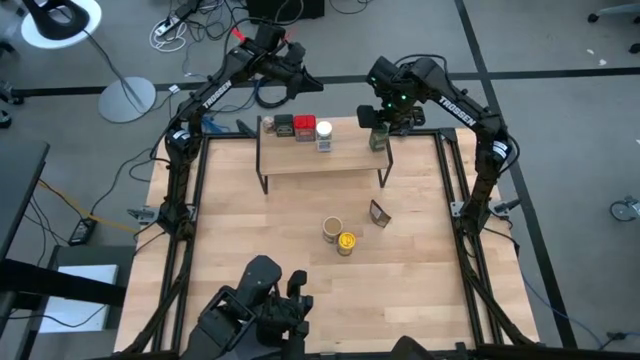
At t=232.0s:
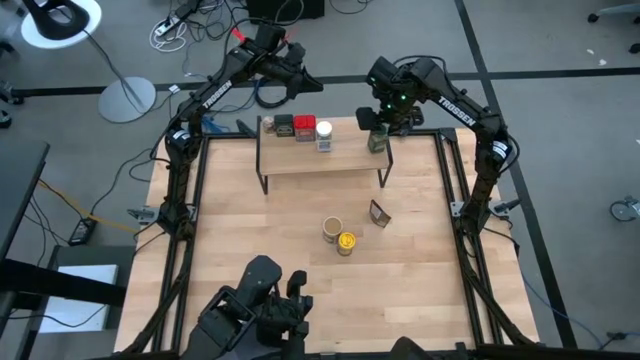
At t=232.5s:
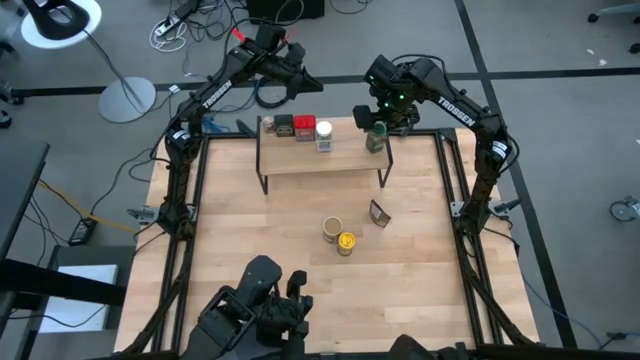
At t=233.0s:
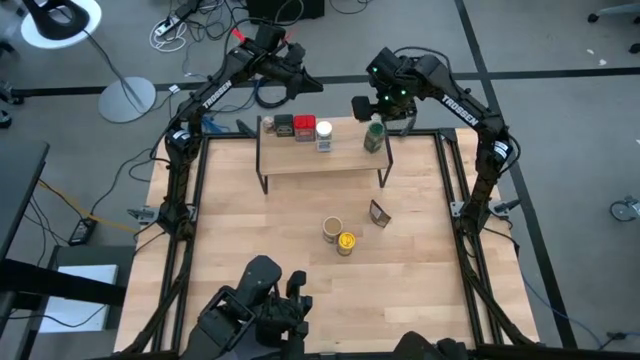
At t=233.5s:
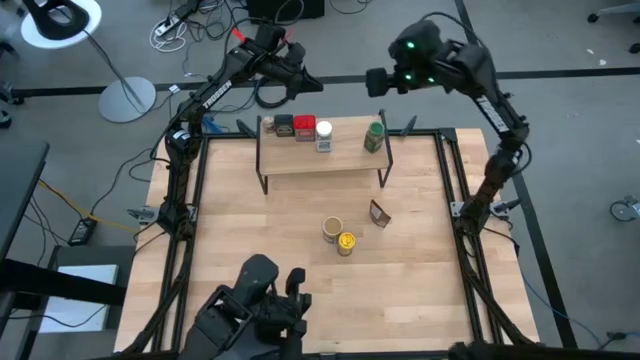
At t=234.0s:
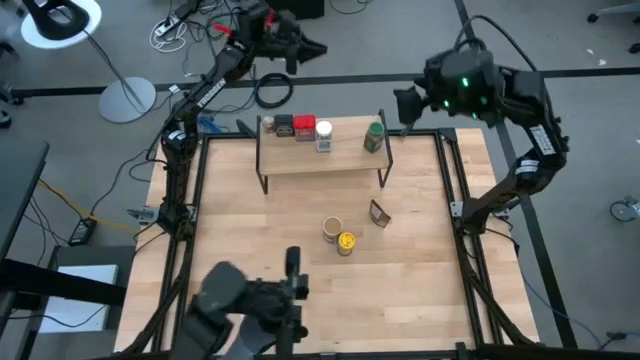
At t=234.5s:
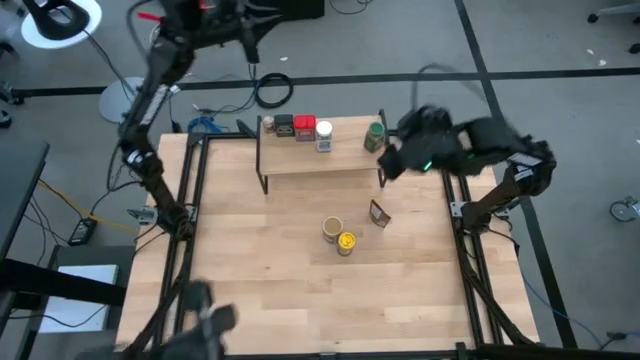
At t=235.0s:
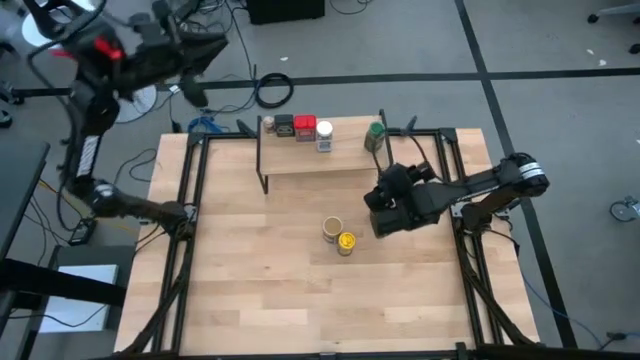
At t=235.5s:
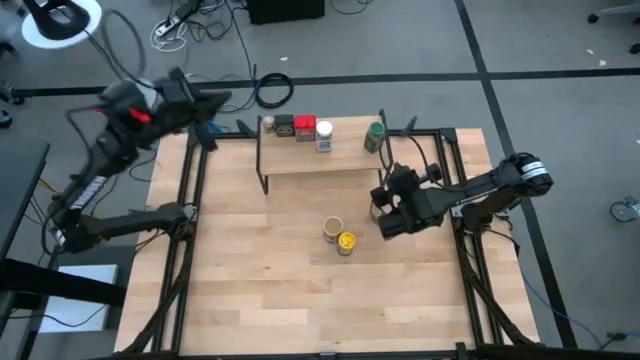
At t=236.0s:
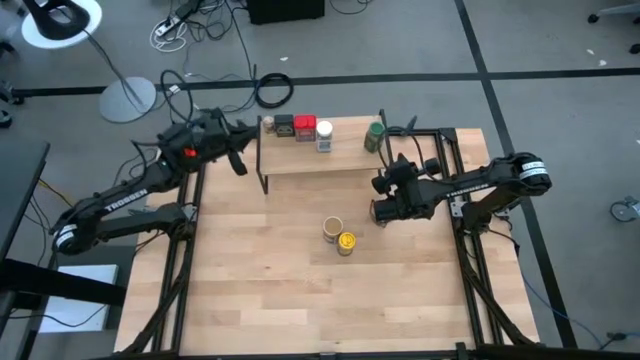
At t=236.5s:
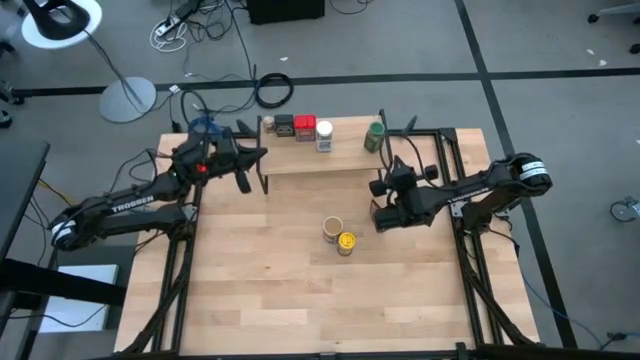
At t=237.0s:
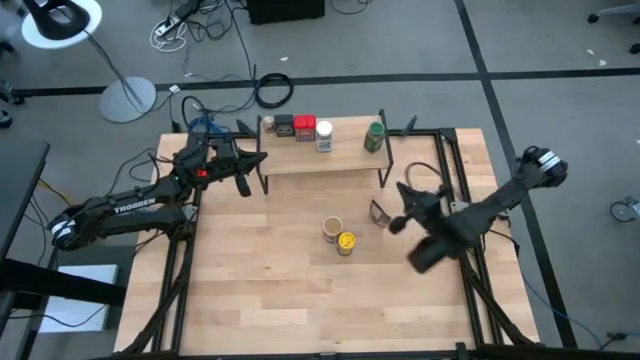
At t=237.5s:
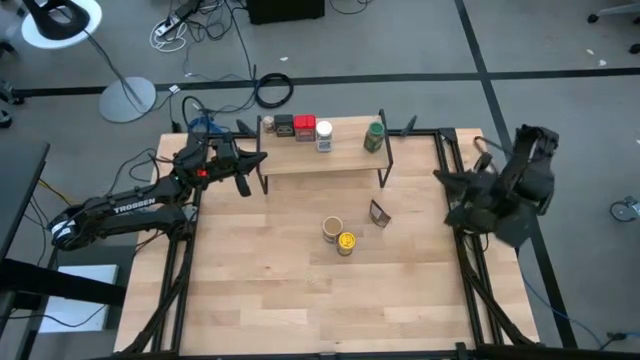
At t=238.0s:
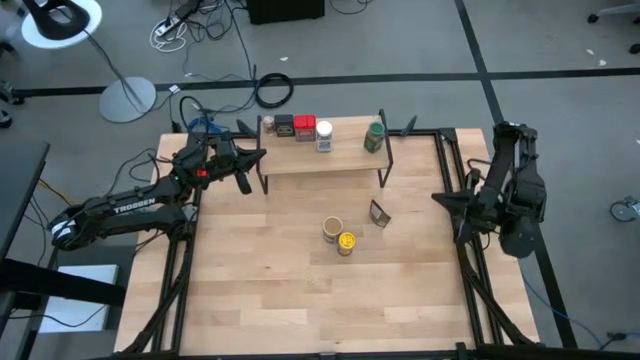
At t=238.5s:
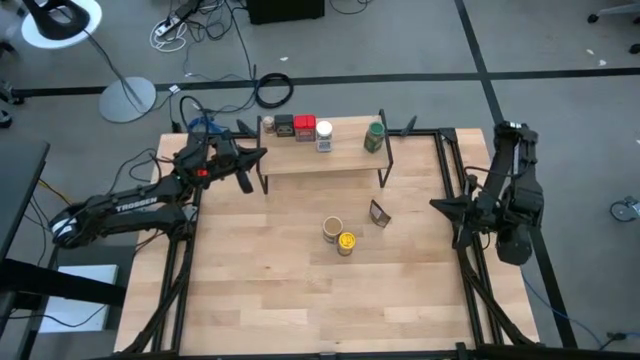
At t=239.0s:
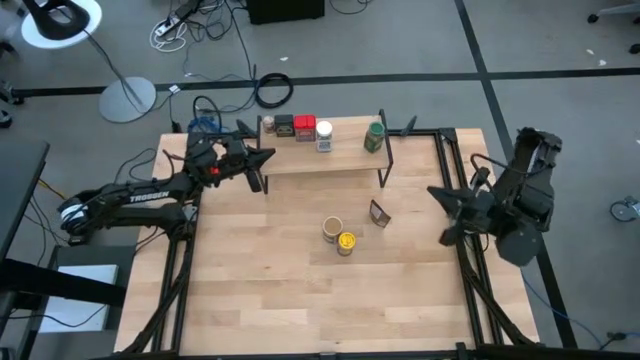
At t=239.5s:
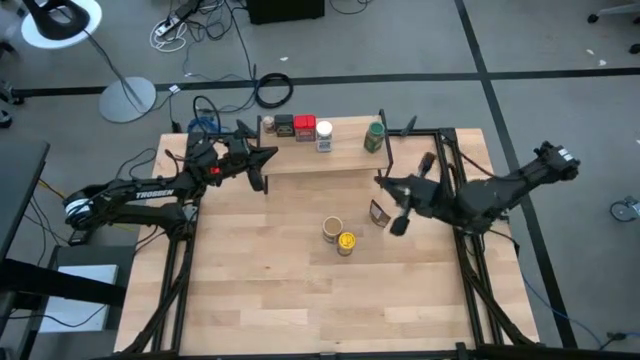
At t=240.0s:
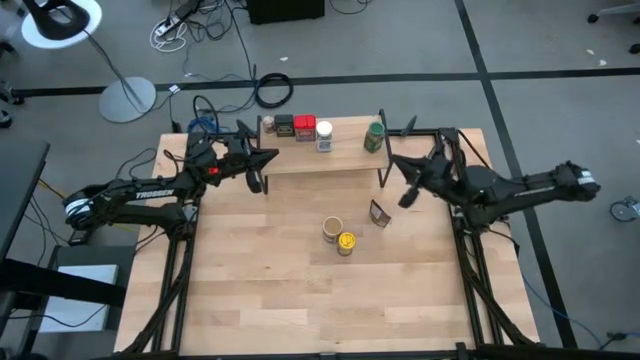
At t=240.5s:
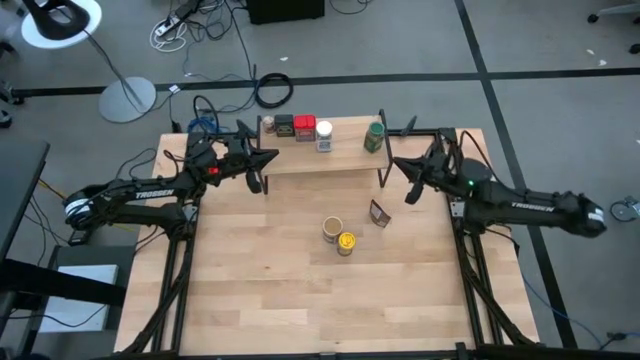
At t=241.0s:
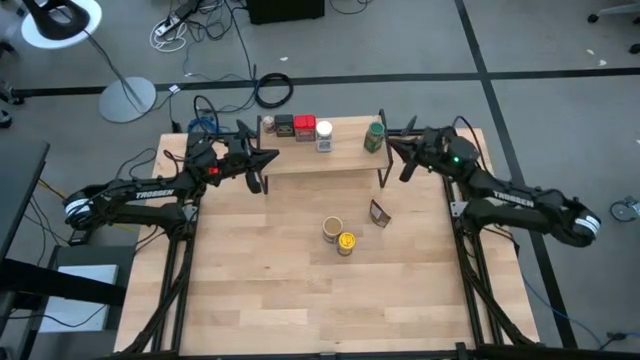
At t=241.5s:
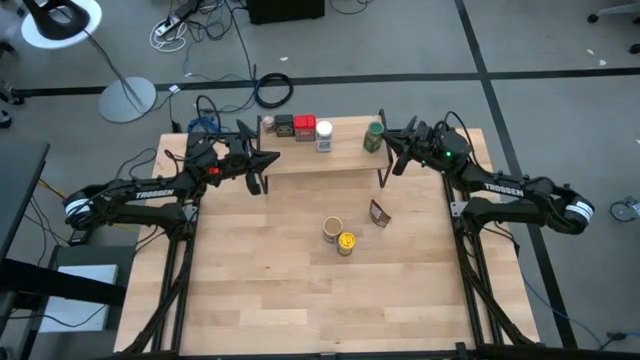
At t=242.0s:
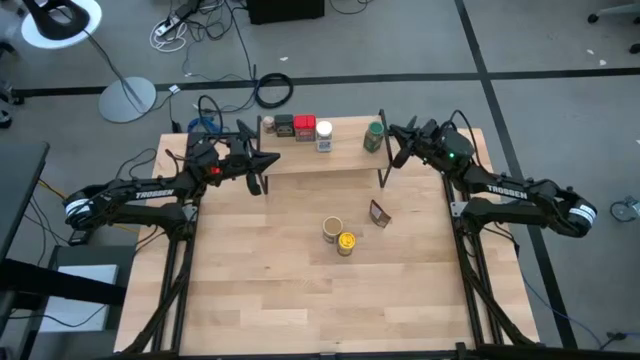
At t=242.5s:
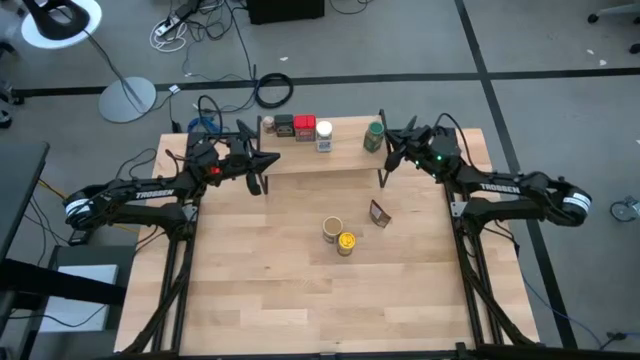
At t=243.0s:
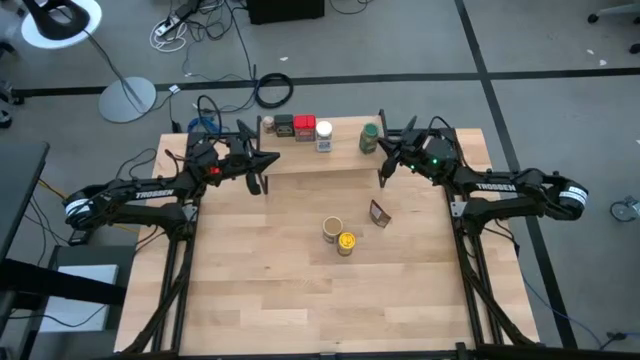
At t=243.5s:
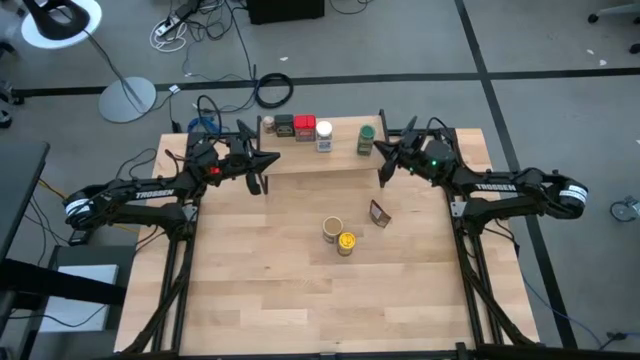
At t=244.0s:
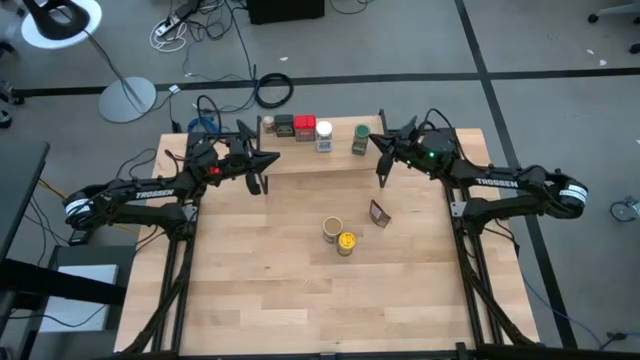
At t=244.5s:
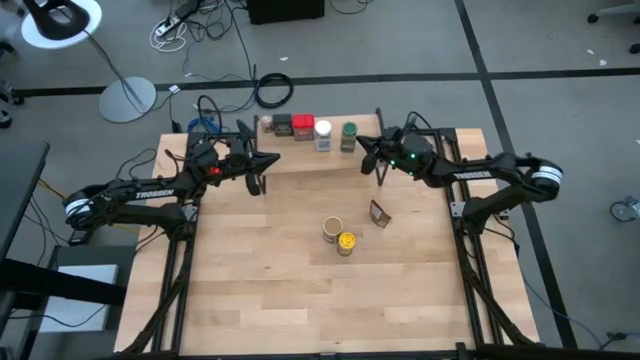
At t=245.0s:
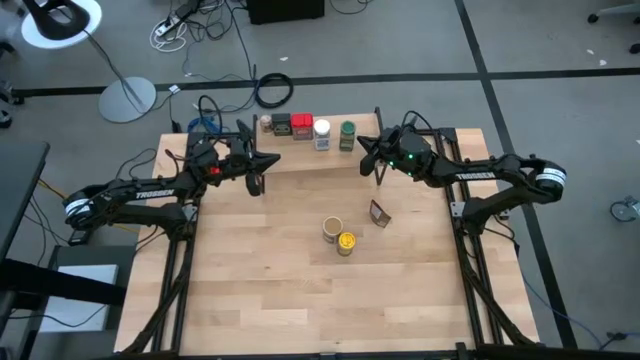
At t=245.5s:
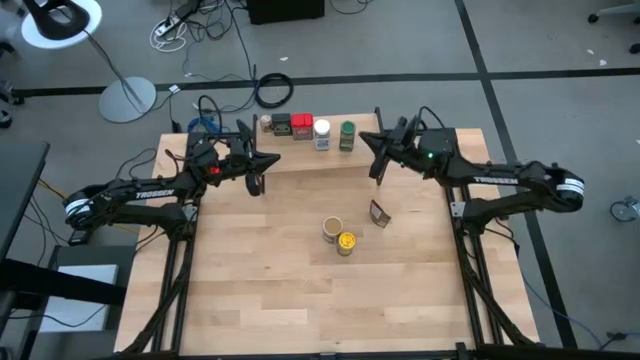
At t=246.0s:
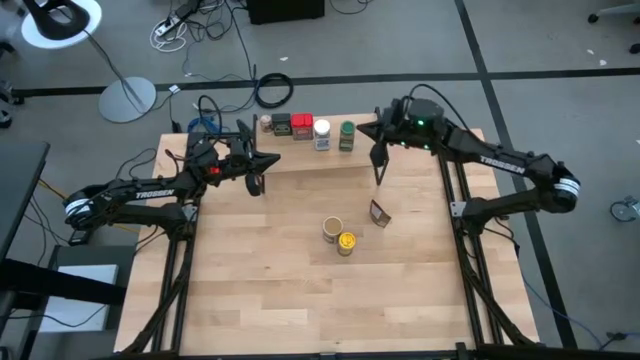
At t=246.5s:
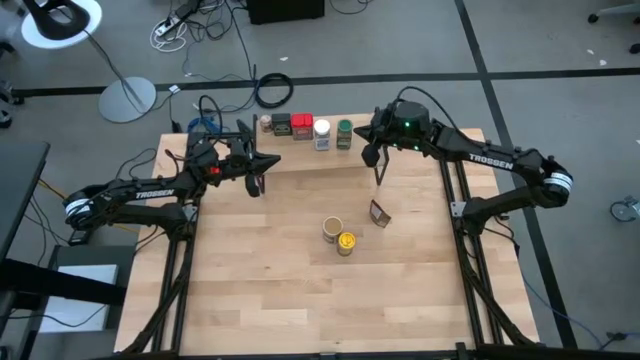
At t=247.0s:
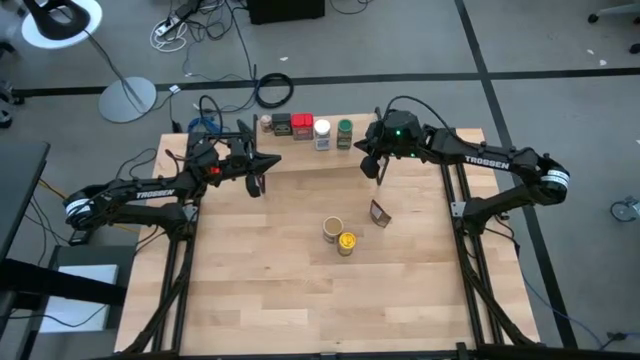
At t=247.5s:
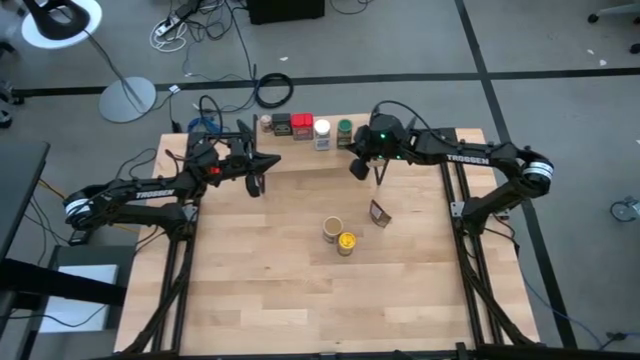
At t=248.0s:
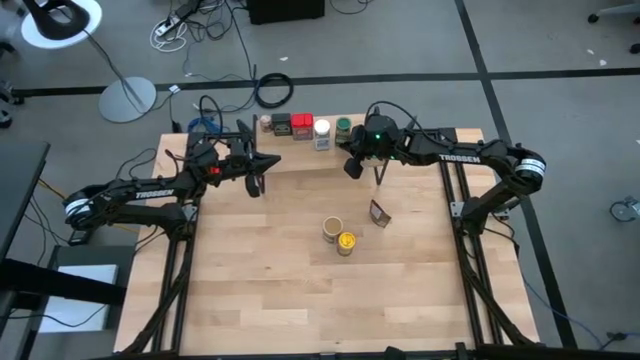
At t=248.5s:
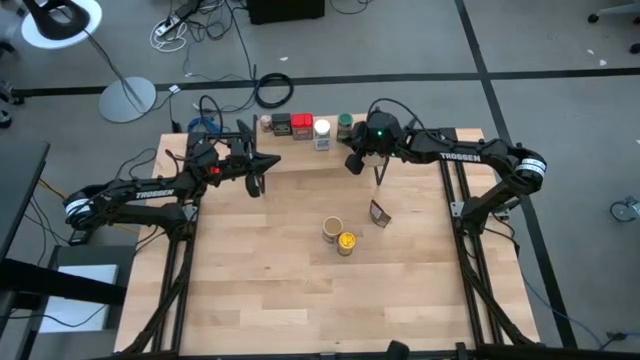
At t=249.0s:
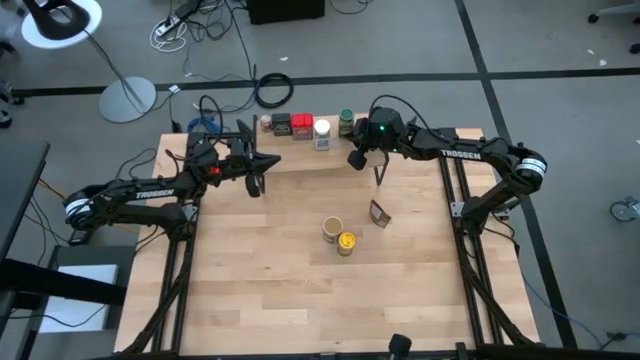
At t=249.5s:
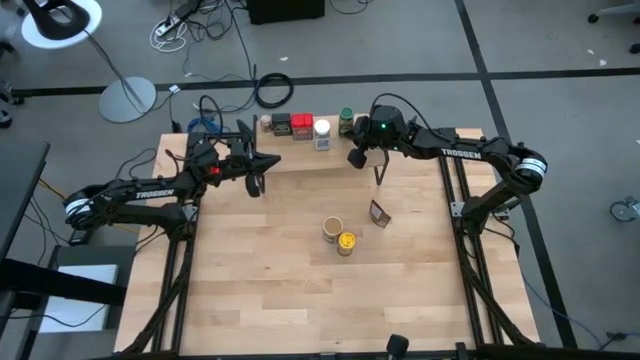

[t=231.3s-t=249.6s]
Task: Shelf spices
Put the green seasoning bottle on the shelf

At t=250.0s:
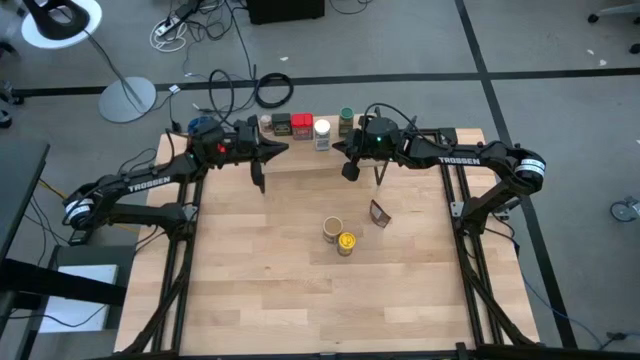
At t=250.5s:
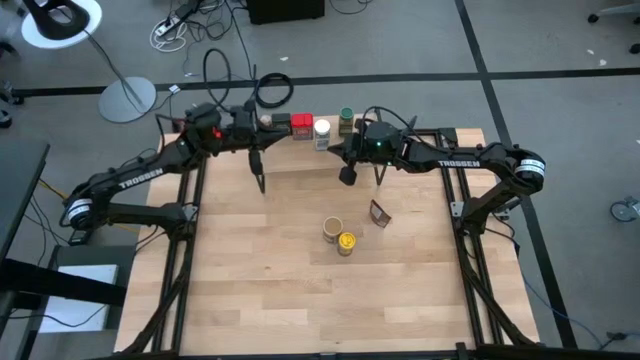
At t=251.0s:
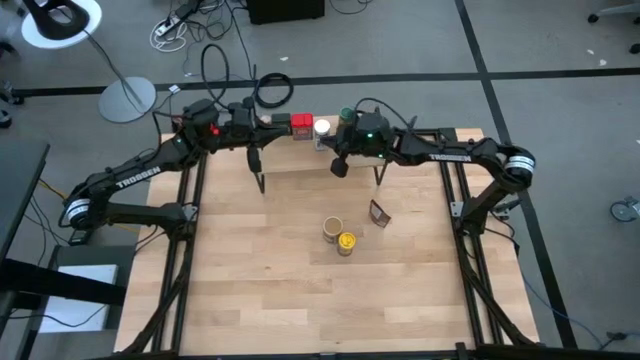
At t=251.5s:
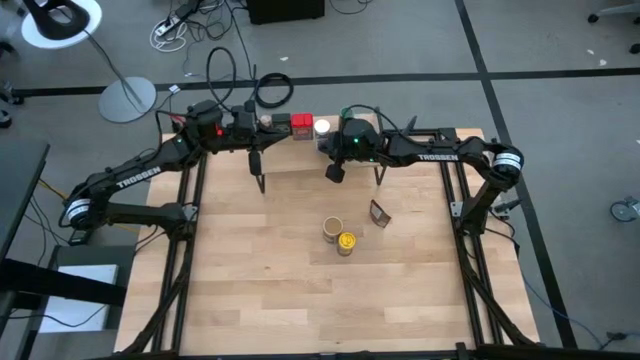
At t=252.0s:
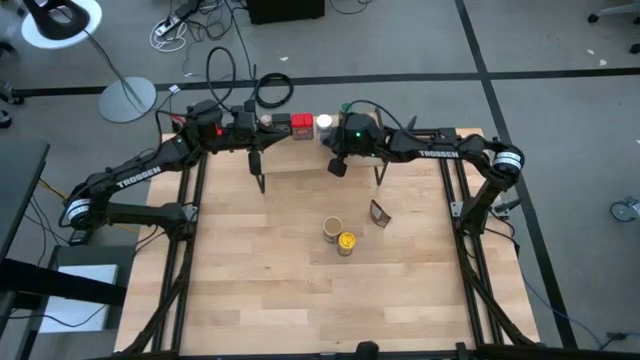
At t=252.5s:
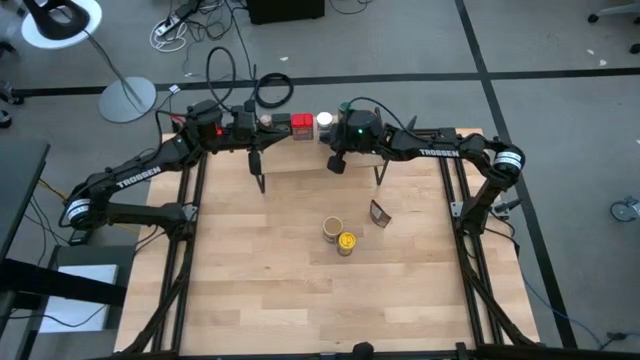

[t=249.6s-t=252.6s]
Adjust the white seasoning bottle on the shelf

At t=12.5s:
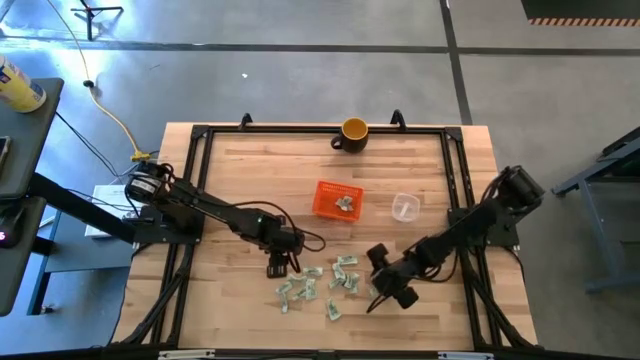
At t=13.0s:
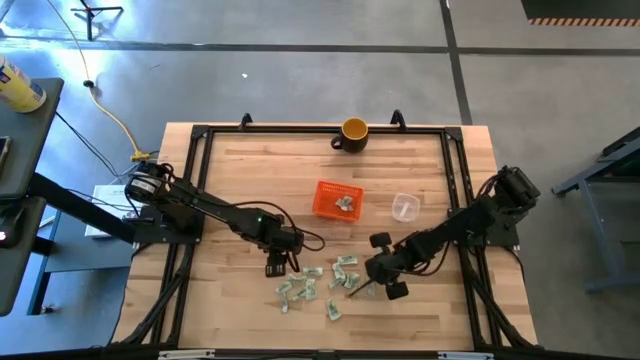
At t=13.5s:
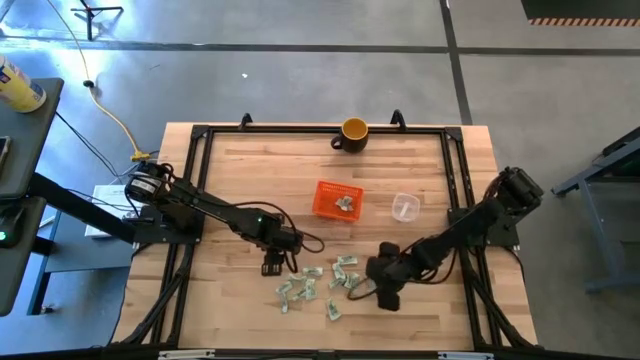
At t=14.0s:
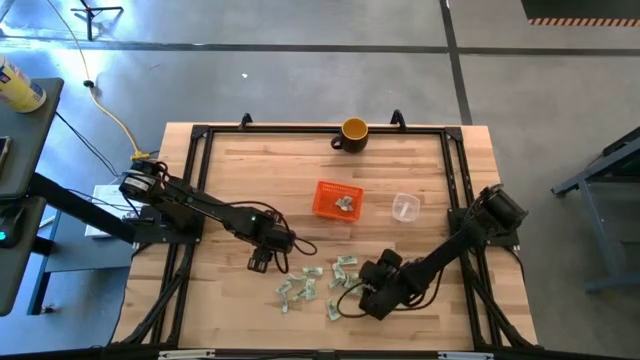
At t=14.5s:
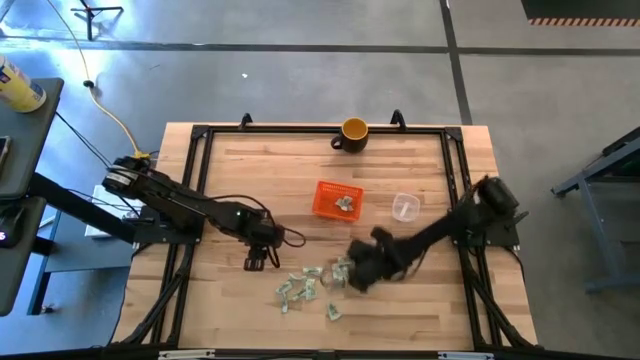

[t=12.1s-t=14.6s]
Task: Pick and place items into bin
Put the white stevia packet into the orange bin
